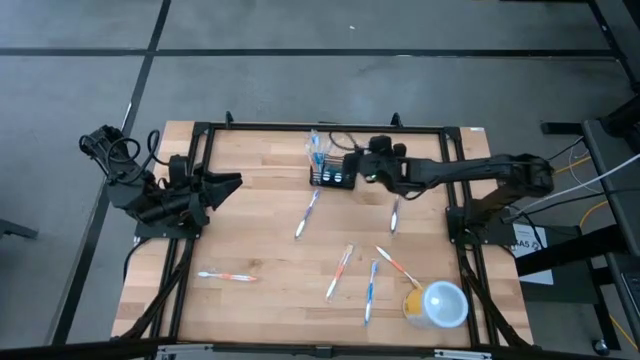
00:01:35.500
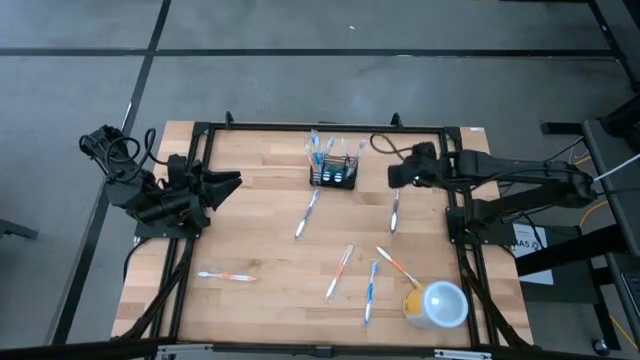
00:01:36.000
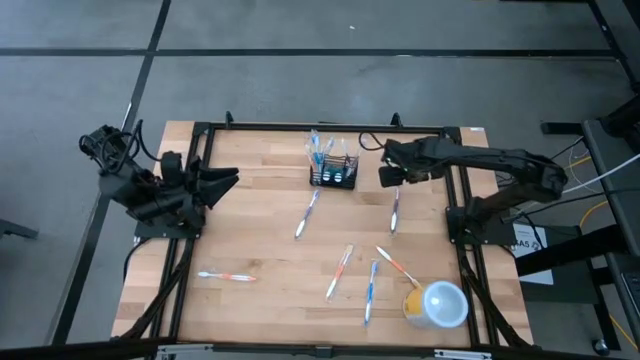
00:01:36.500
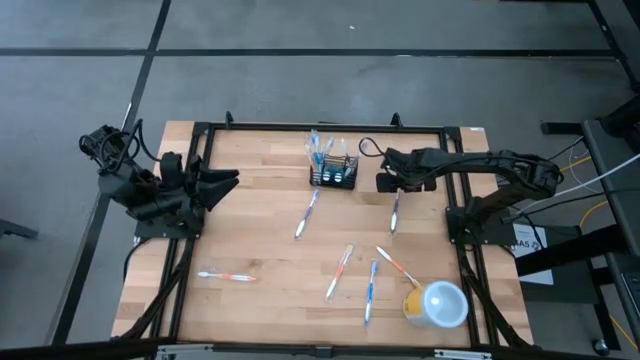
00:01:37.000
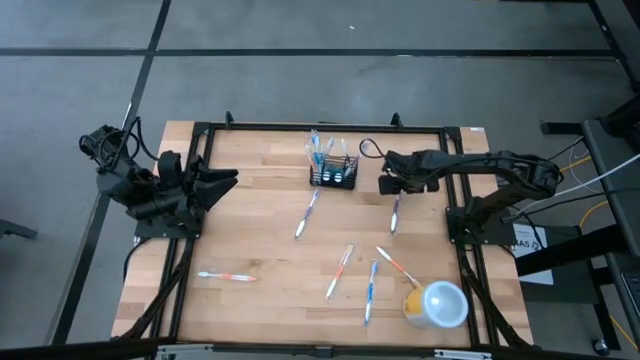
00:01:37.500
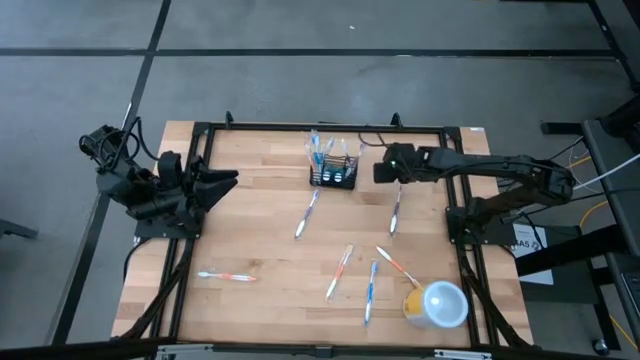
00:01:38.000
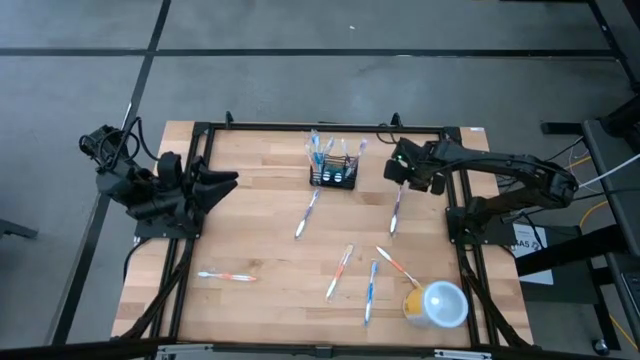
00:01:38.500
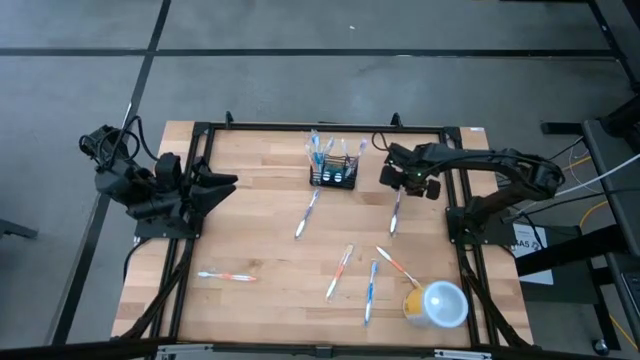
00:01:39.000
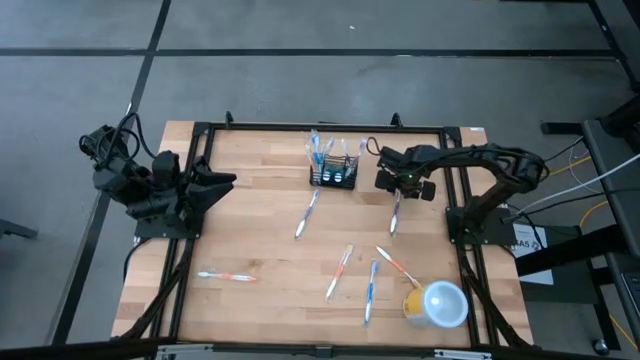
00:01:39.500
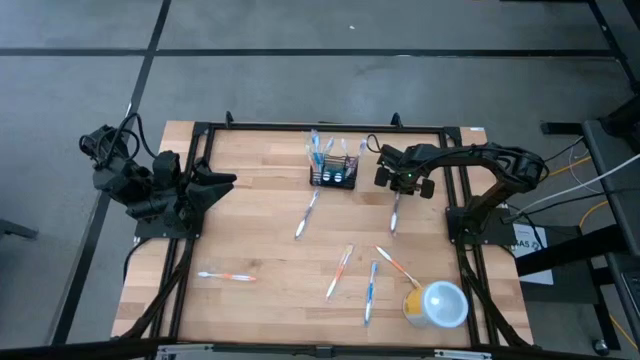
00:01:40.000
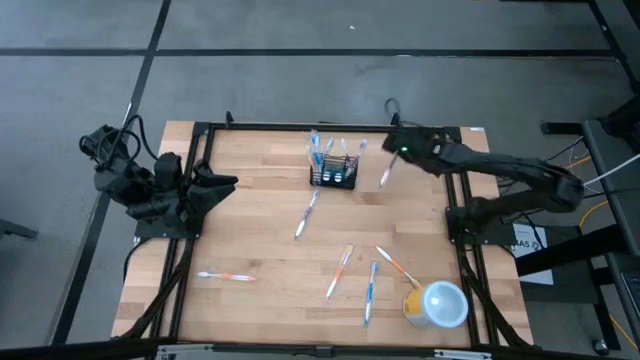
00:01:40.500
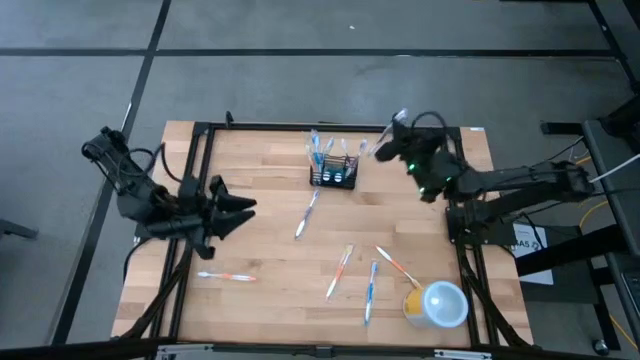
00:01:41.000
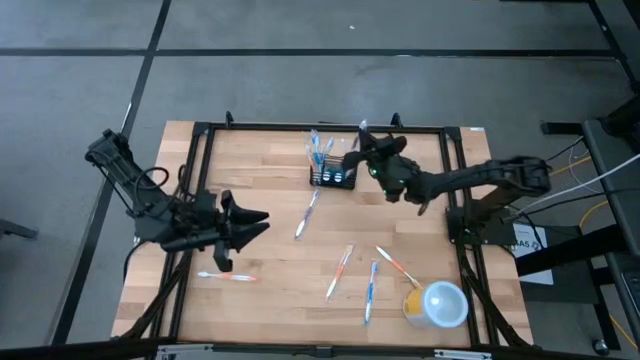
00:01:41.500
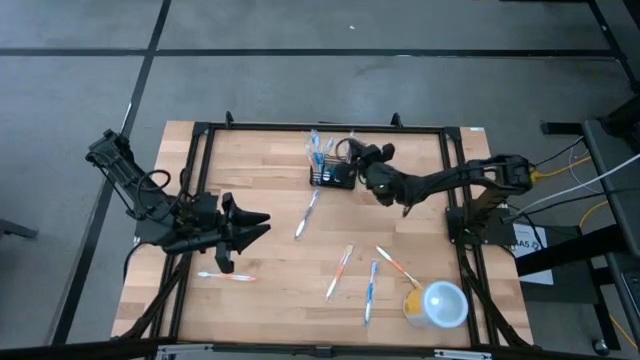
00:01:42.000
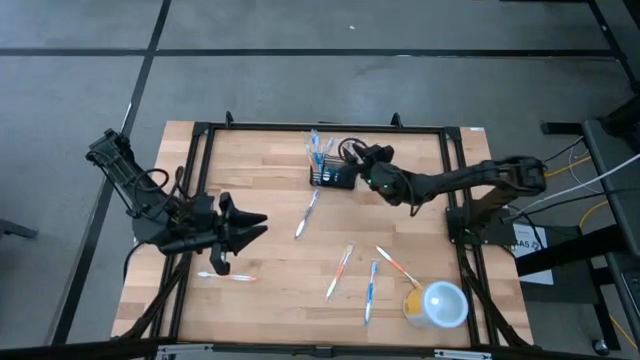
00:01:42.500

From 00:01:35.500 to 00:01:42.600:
Task: Pick & Place toothbrushing station
Put the right violet toothbrush into the right section of the mesh organizer

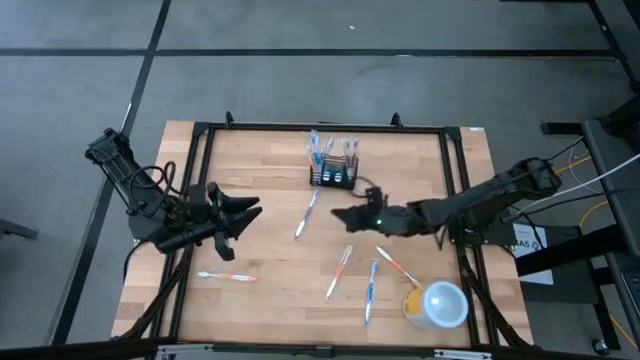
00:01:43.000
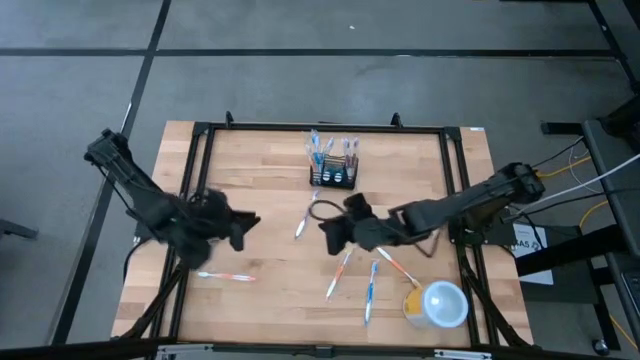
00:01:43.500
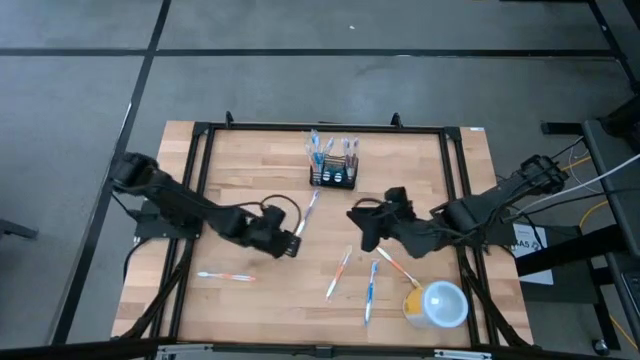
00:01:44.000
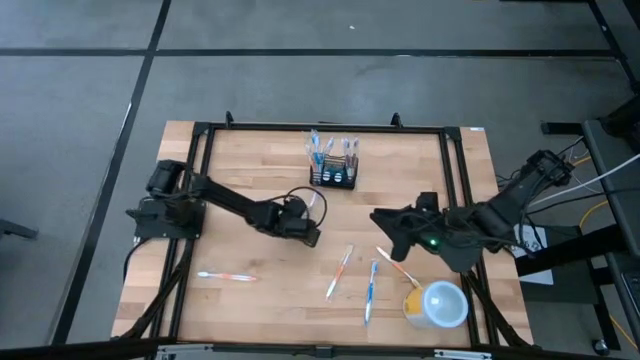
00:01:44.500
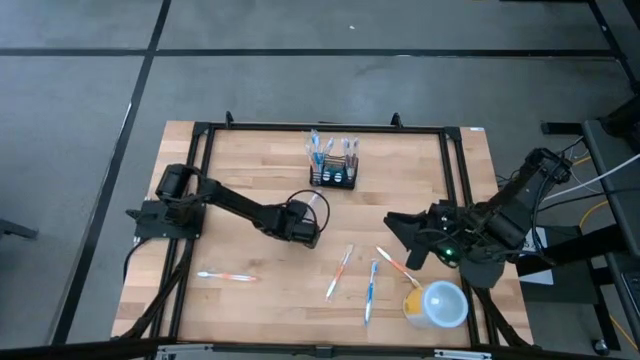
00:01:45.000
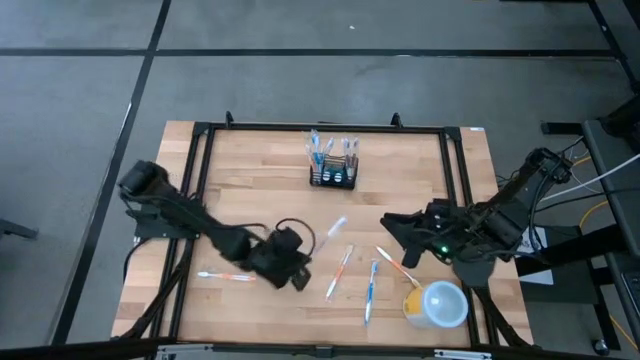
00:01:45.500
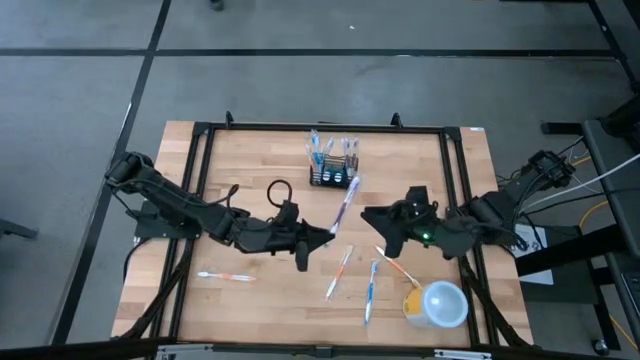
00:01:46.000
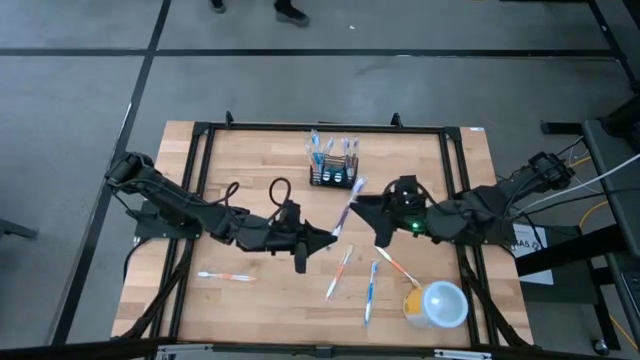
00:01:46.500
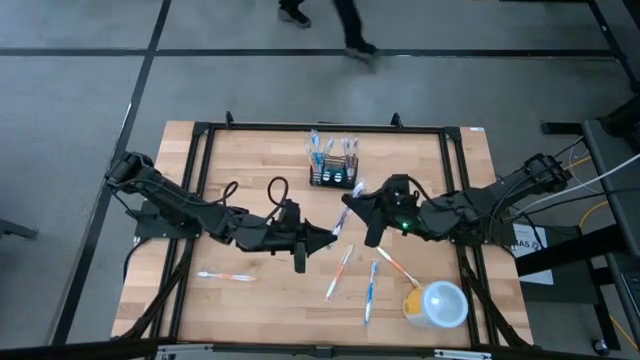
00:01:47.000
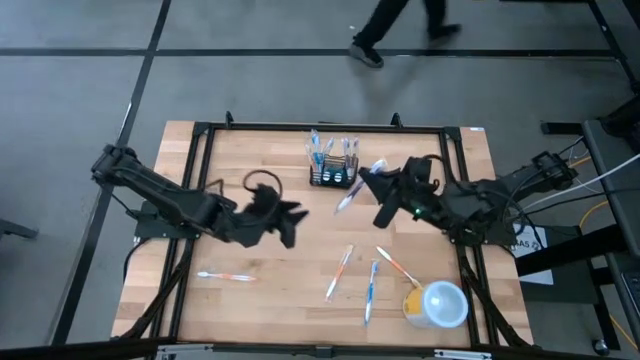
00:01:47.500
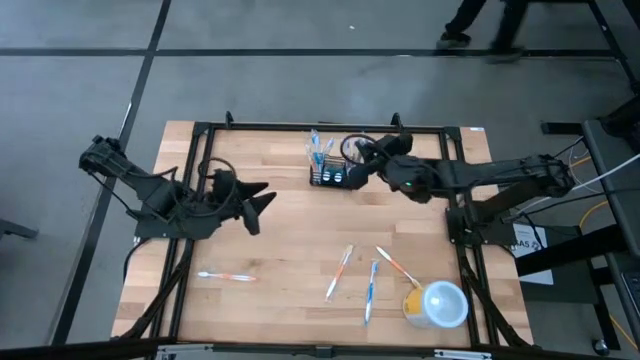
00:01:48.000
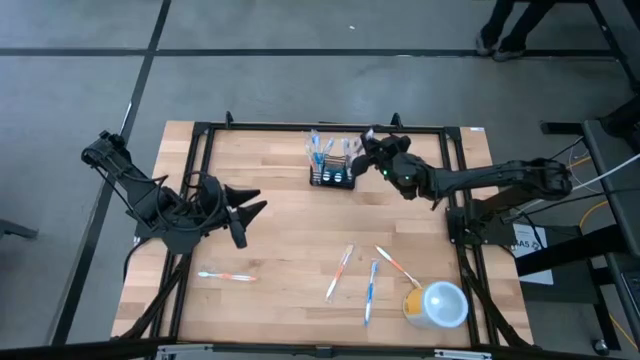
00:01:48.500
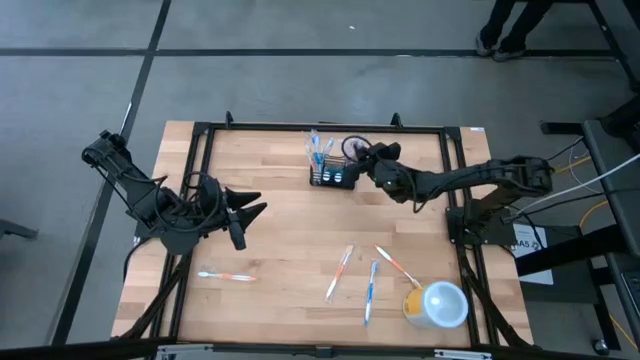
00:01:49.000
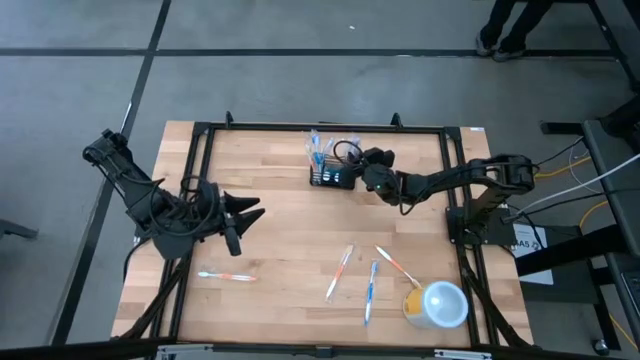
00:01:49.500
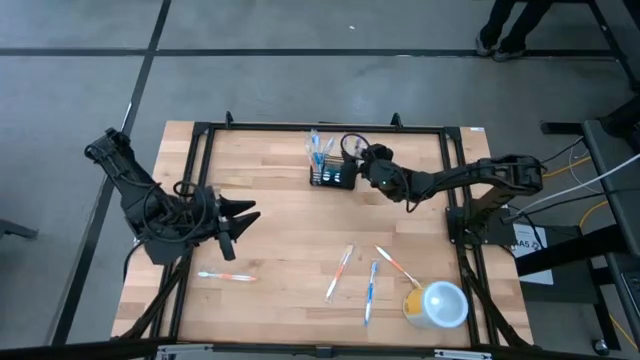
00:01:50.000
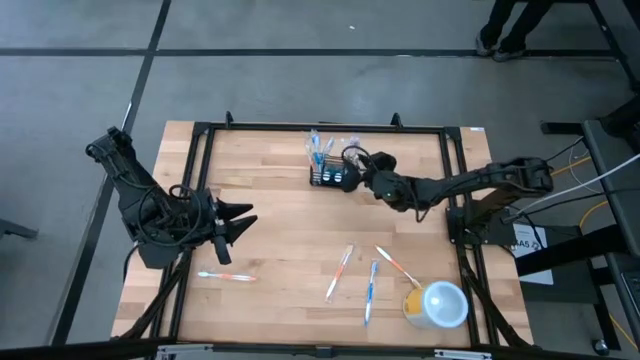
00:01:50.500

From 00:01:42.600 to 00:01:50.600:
Put the violet toothbrush into the right section of the mesh organizer

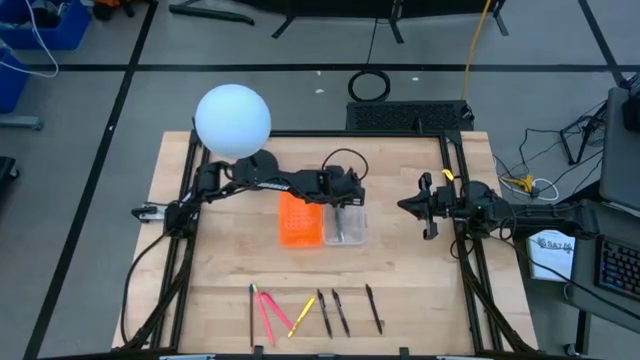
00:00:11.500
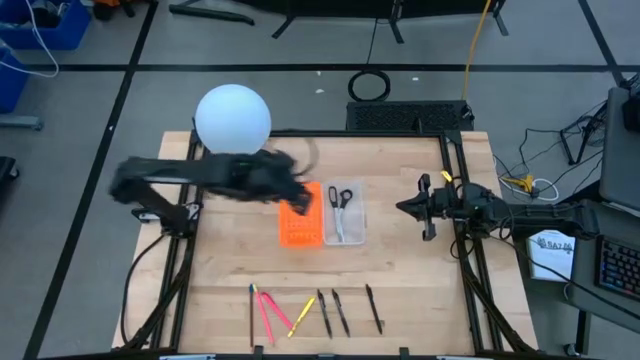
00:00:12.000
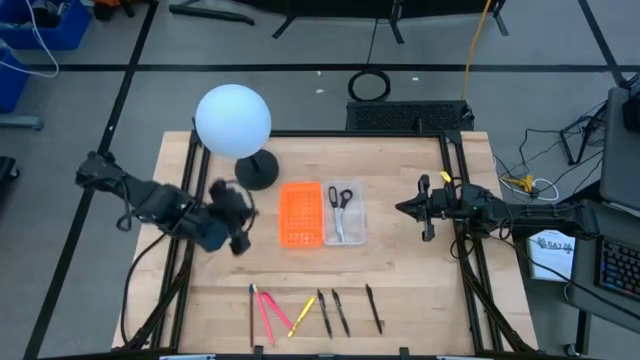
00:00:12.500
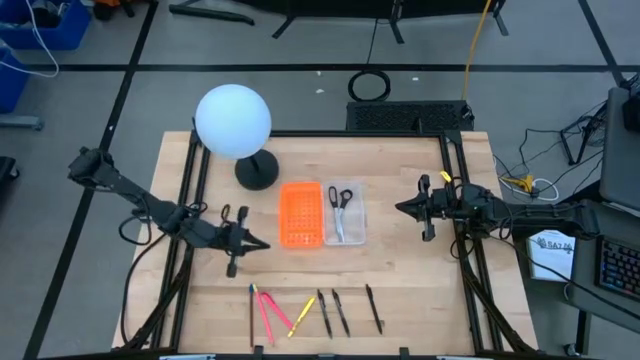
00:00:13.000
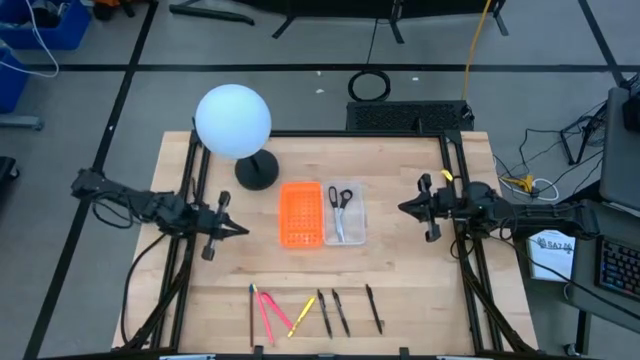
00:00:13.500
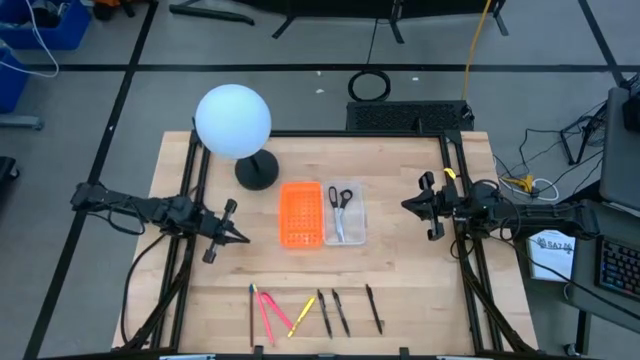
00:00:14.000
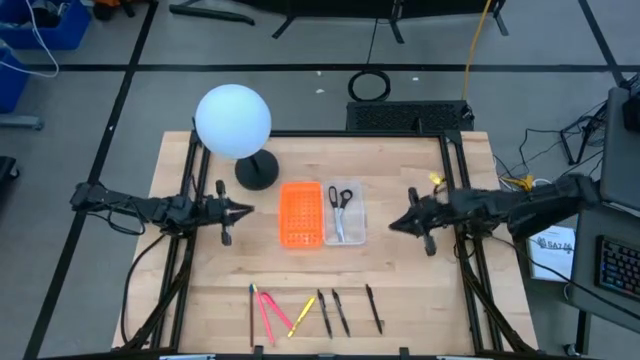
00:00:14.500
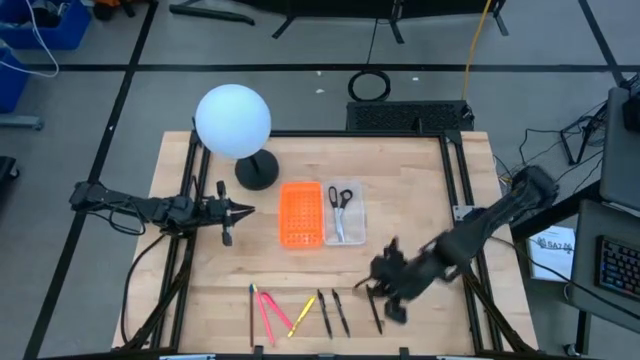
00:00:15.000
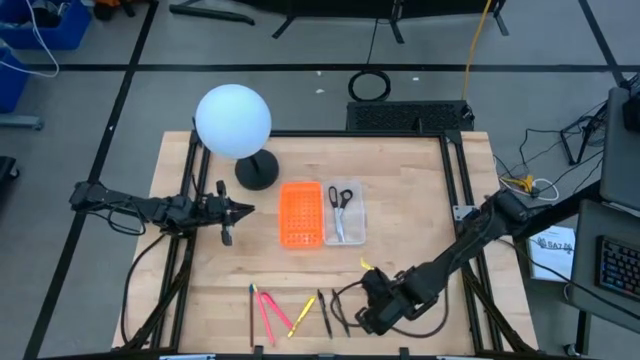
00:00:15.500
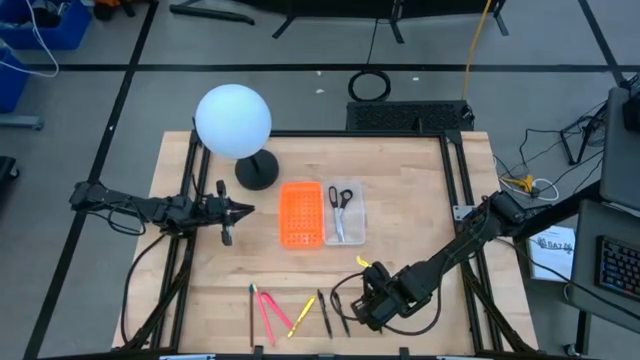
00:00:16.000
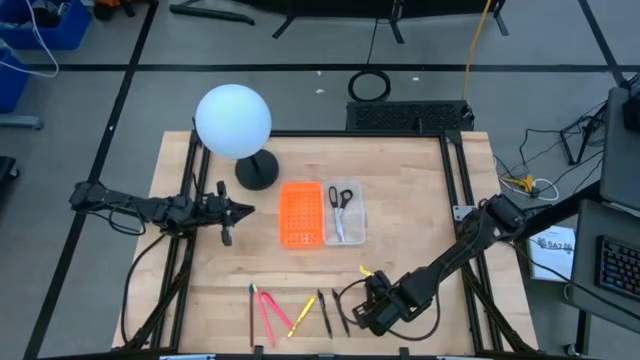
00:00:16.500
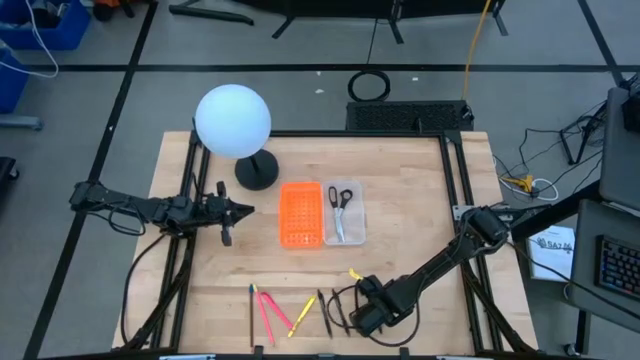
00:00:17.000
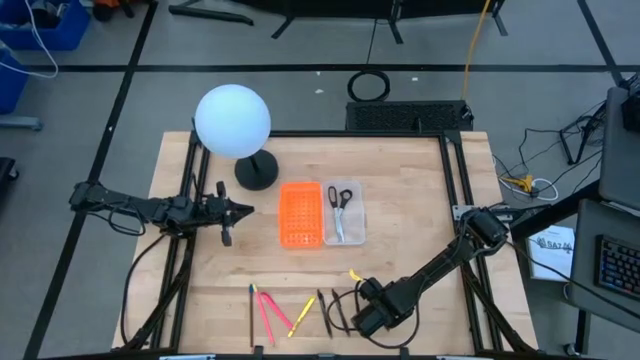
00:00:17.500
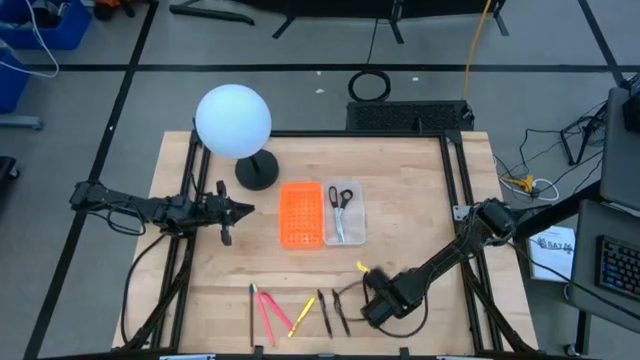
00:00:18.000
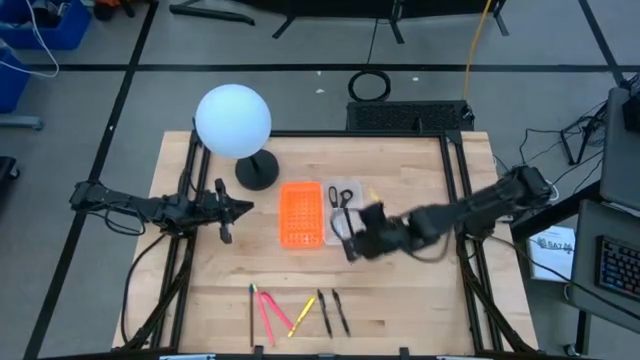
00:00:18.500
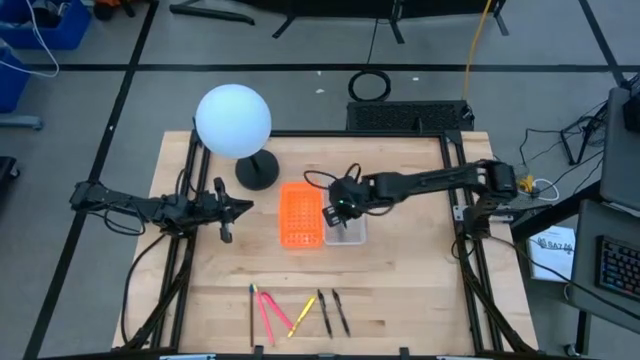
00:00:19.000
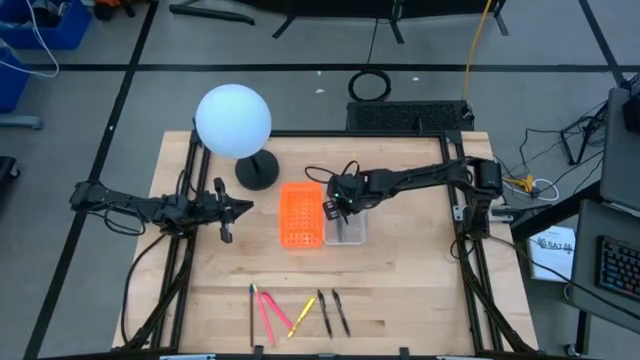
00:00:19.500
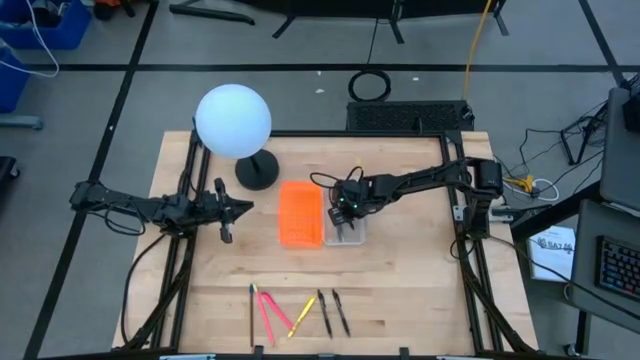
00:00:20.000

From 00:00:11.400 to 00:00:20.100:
Task: Pick & place school supplies into a supply box
Put the right black pen into the orange supply box
